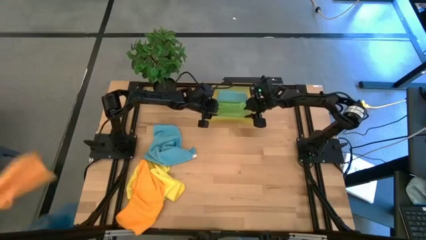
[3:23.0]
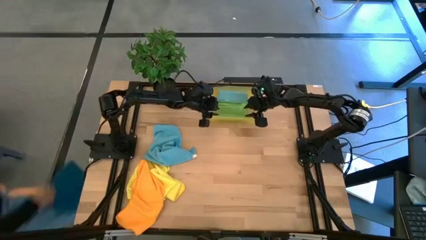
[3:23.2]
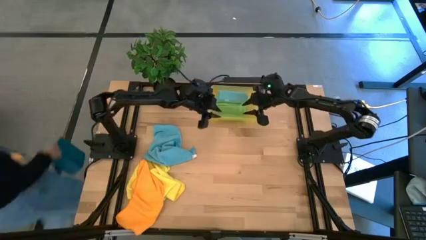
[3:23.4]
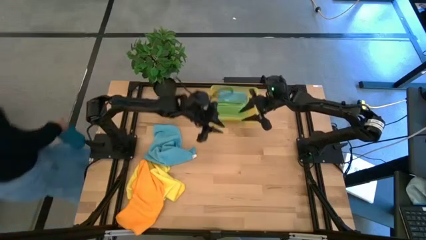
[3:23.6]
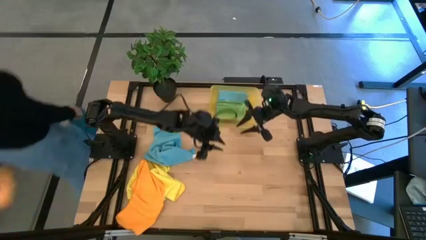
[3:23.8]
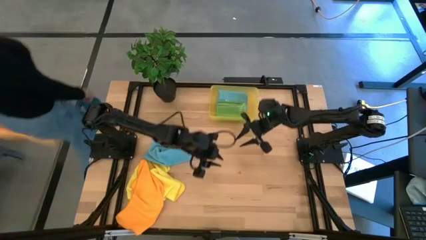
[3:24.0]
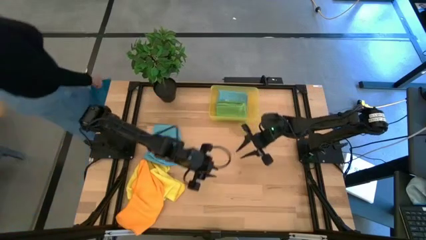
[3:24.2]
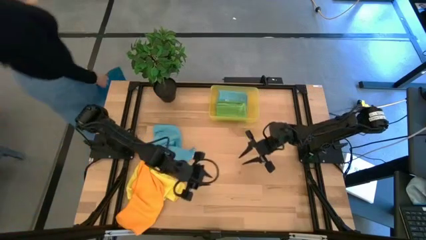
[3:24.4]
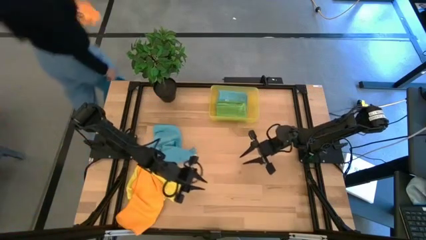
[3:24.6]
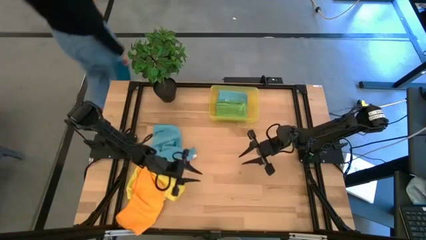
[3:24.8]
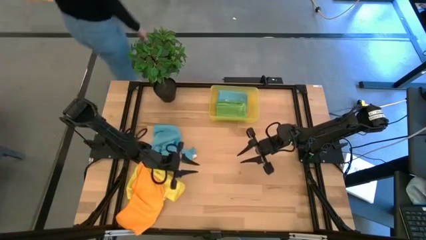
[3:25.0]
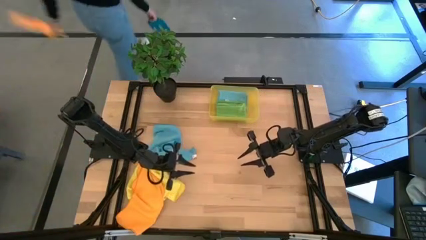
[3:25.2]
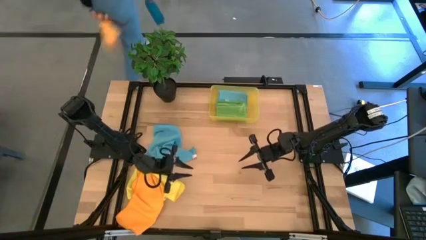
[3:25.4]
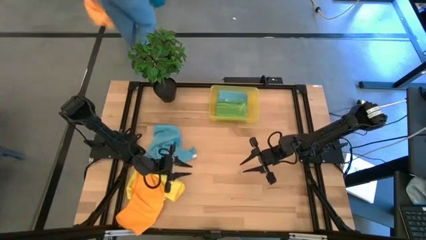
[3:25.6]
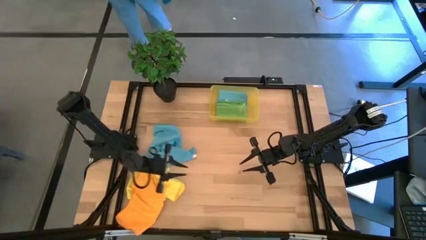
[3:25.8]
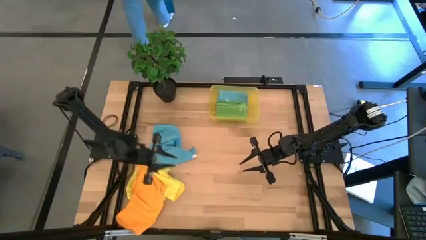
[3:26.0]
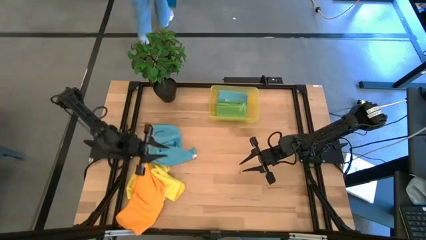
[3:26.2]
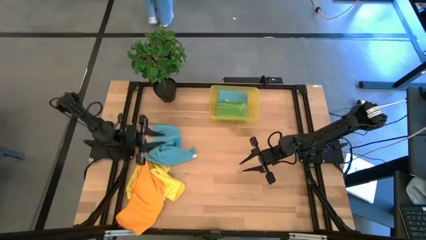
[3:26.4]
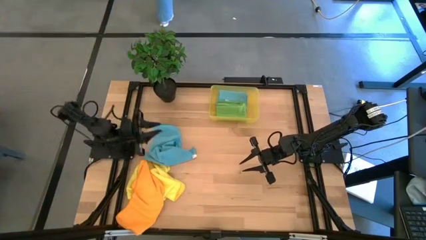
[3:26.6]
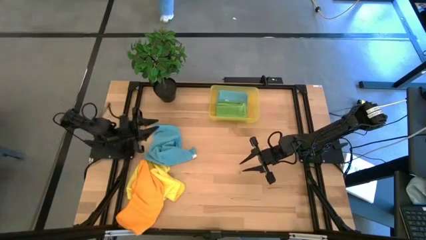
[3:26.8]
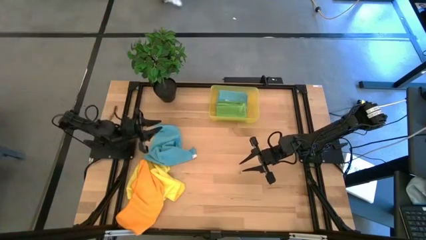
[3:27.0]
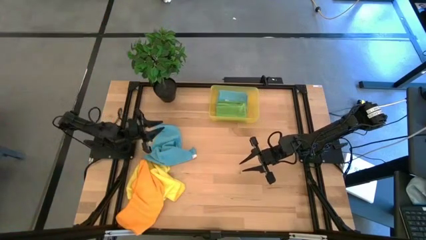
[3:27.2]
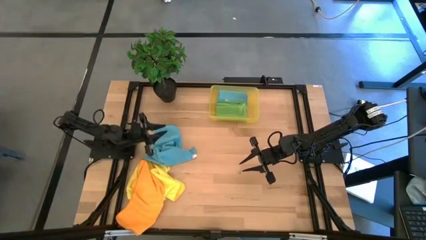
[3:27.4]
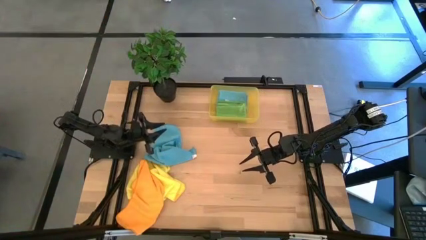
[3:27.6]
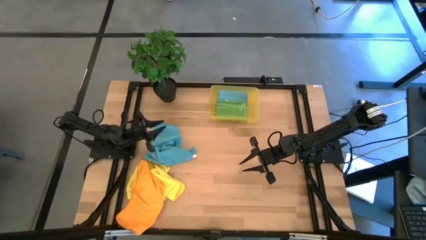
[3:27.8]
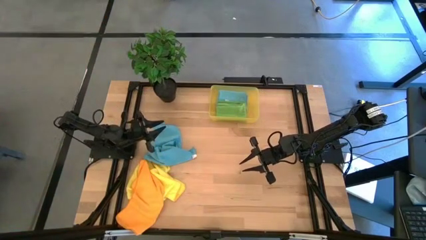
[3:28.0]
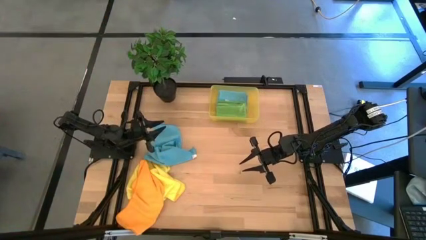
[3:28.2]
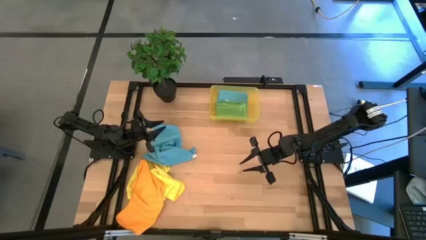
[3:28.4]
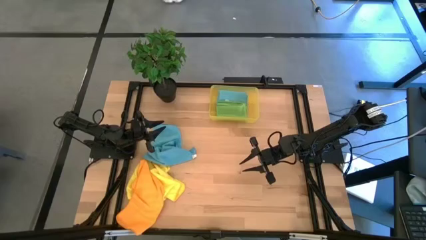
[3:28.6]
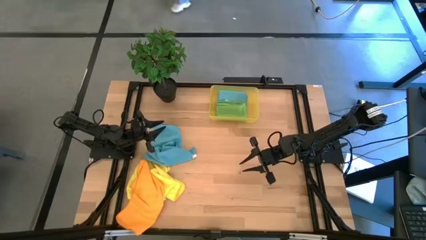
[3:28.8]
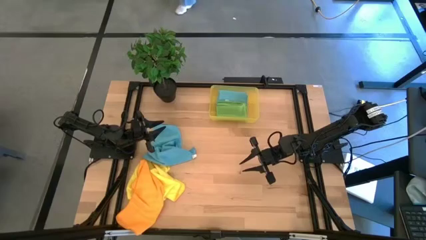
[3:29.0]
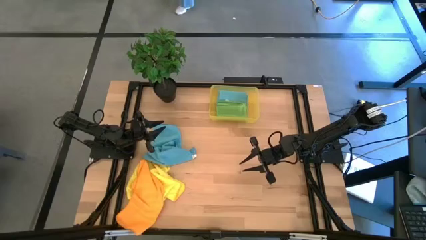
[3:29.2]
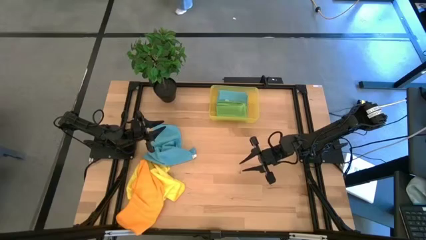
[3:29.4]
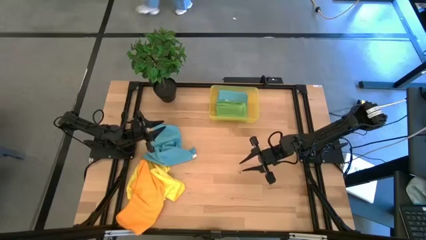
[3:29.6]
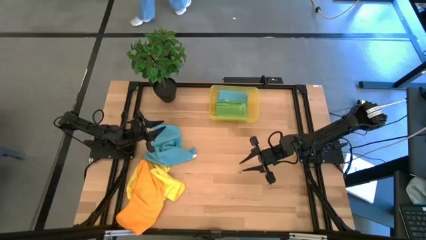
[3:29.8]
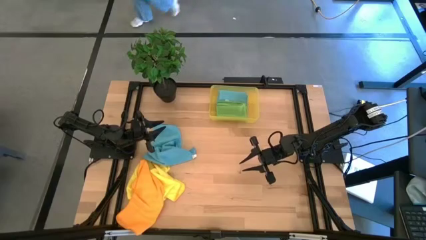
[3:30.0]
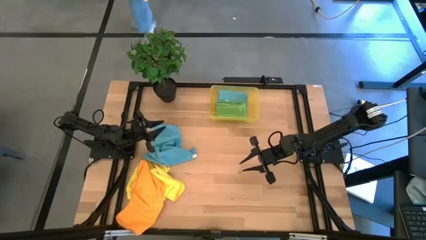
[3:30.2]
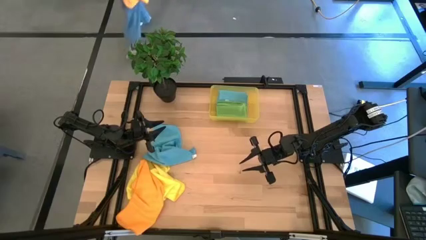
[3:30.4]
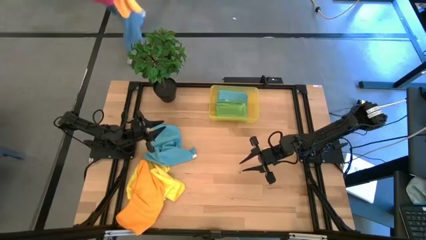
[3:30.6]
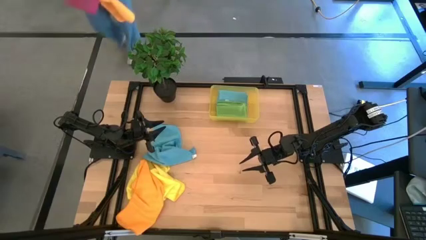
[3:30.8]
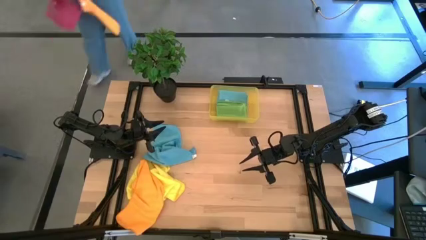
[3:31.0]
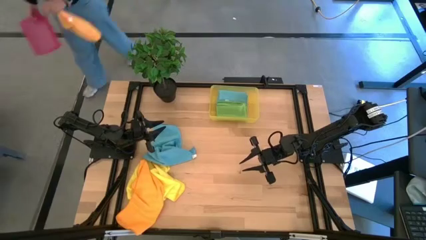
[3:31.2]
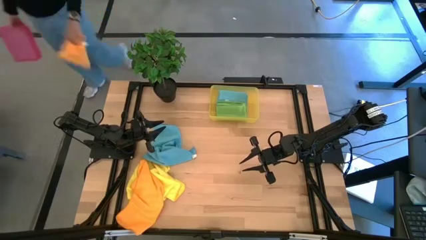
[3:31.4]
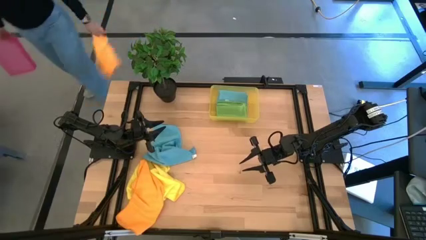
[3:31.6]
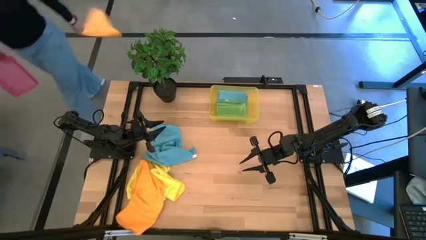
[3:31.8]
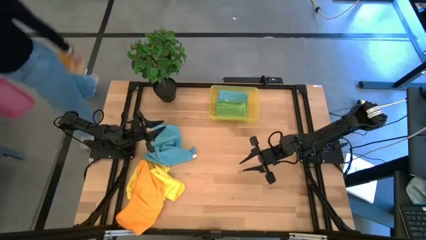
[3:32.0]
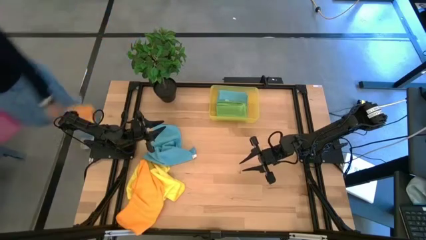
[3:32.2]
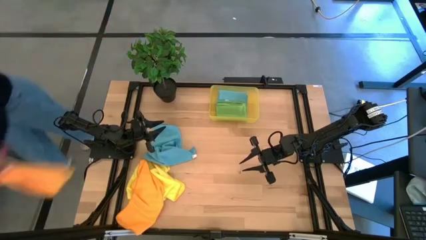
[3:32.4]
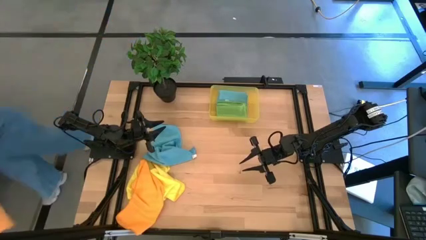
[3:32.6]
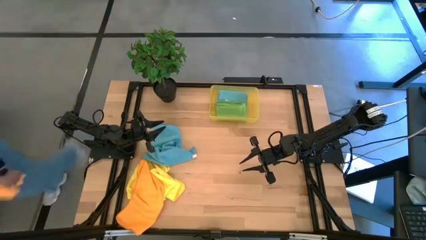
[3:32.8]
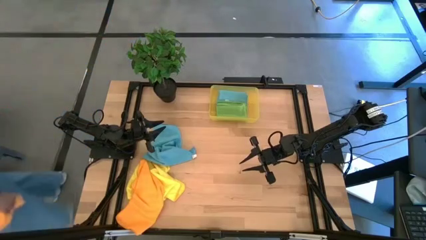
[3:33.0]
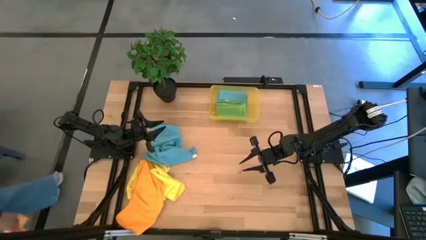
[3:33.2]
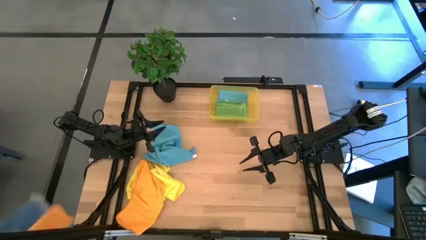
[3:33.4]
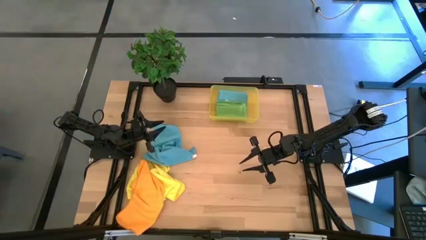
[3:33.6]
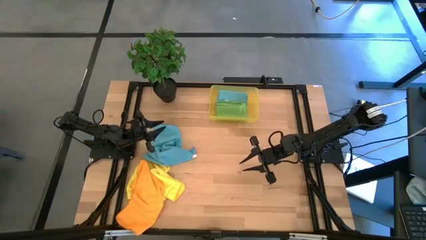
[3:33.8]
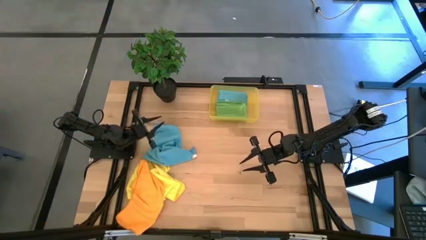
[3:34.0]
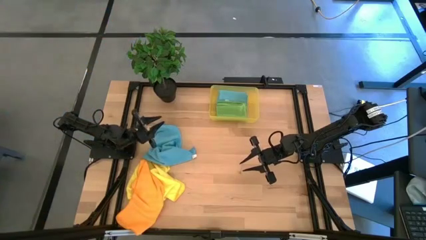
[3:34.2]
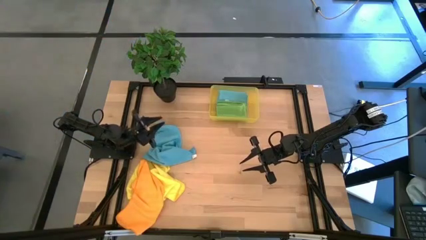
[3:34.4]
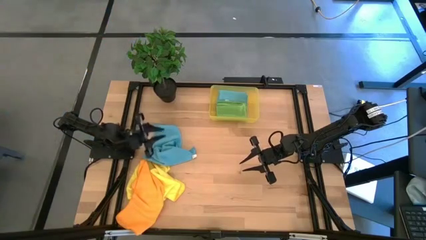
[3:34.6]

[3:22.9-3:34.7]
Task: Fold microfiber towels
Fold the blue microfiber towel
